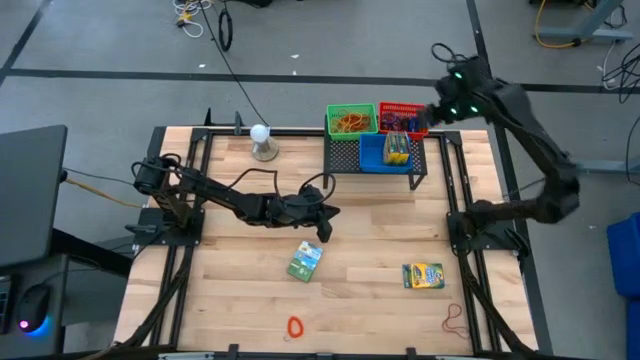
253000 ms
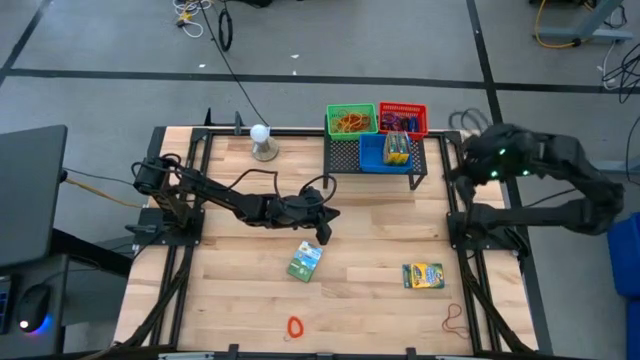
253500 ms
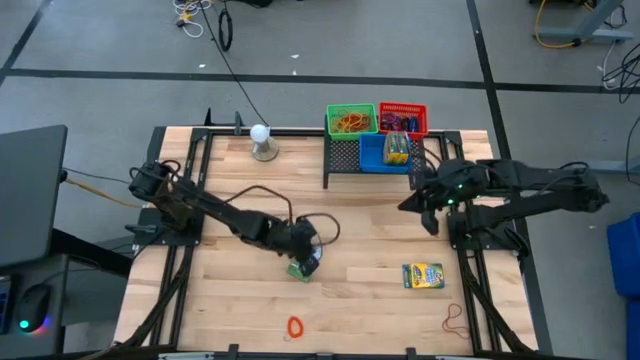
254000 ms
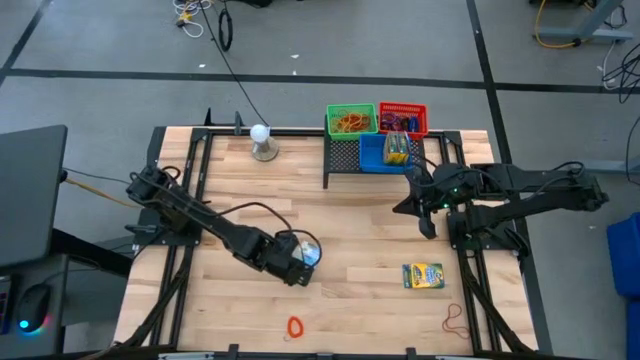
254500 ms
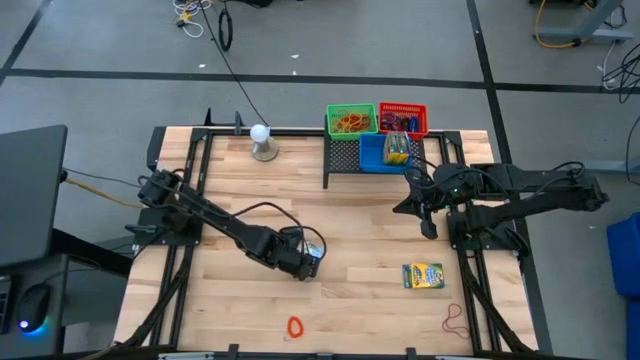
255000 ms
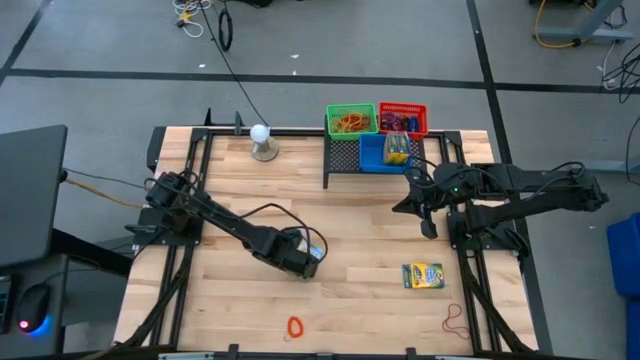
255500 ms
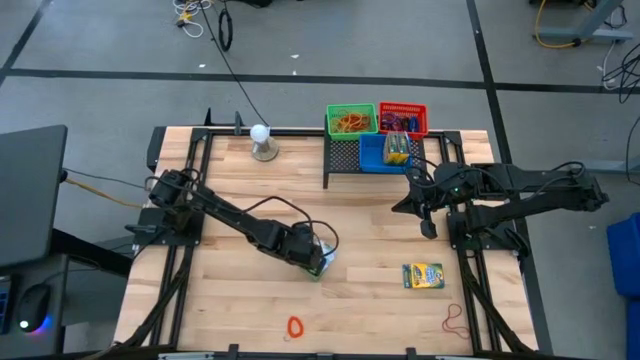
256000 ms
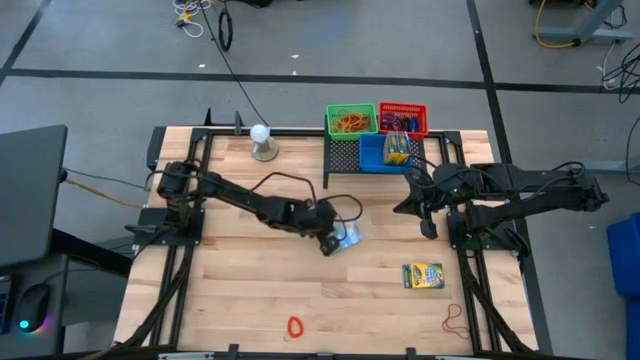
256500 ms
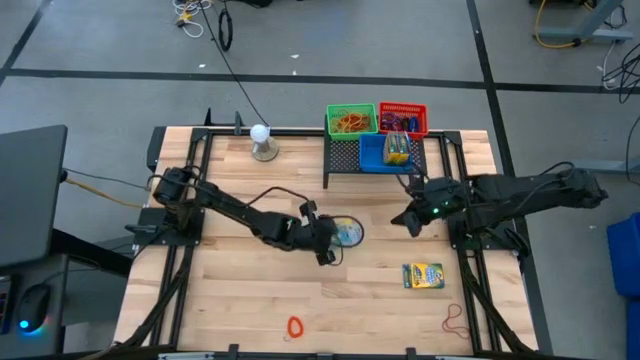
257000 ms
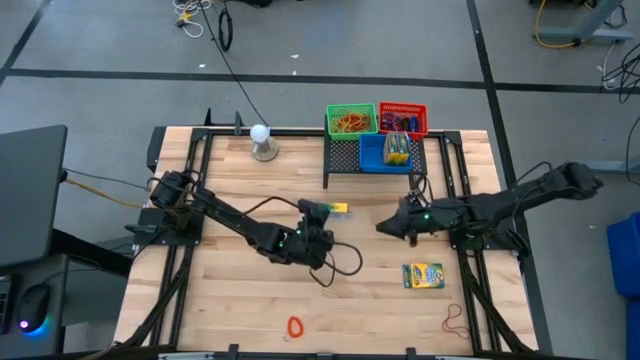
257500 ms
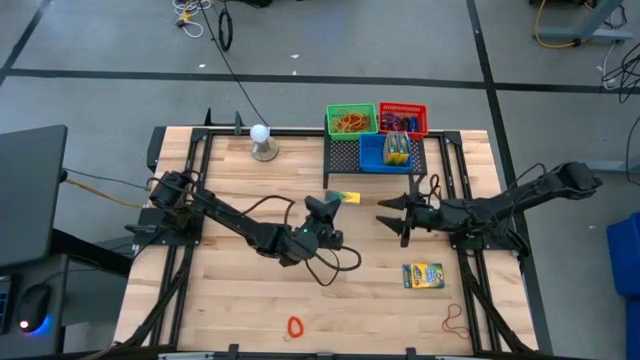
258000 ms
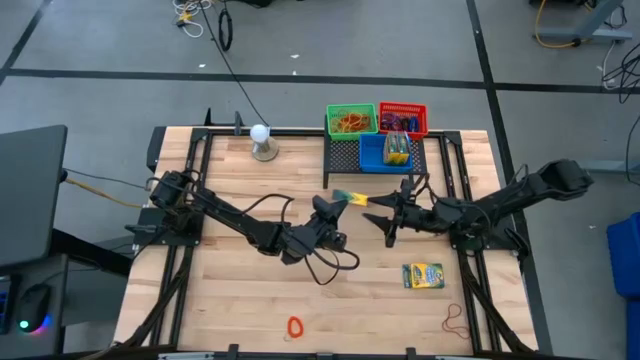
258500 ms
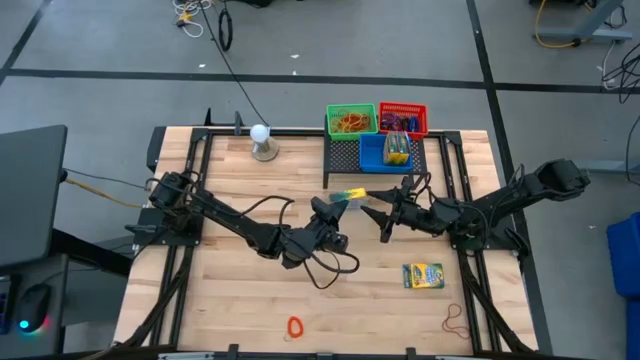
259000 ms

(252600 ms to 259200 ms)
Task: Pick & Place Office Desk Supplies
Put the yellow crayon box into the blue bin

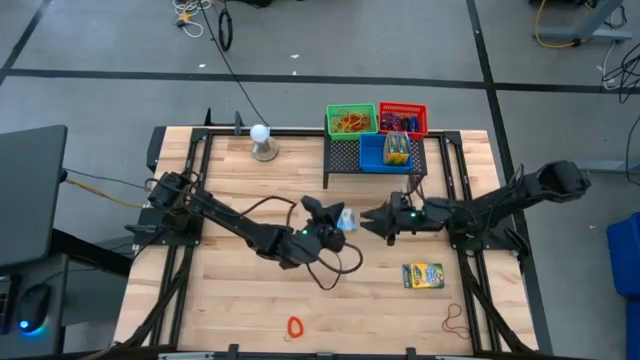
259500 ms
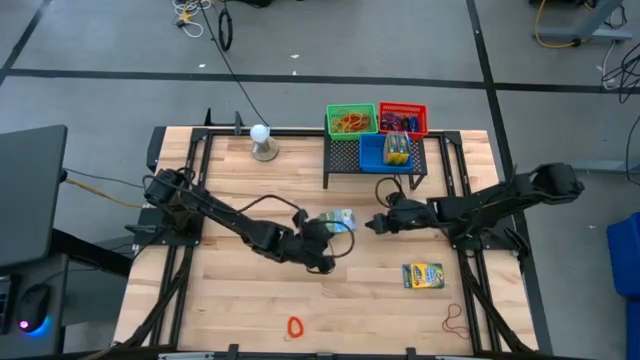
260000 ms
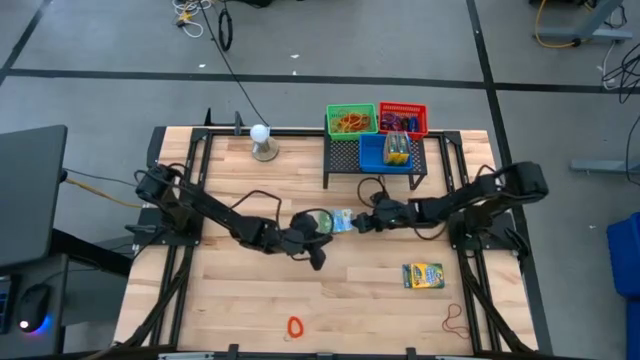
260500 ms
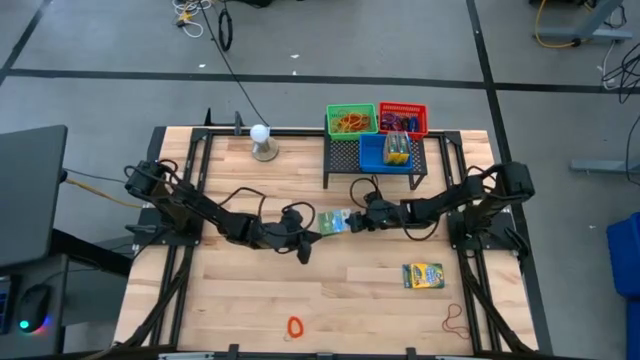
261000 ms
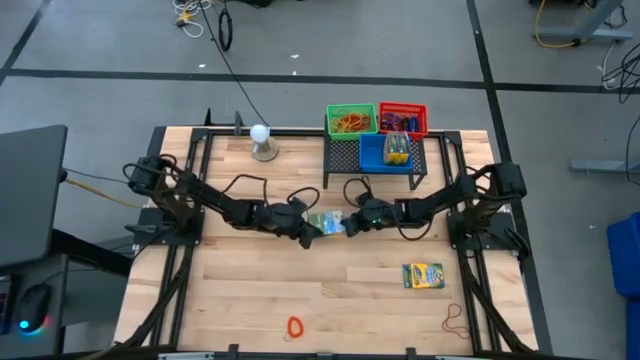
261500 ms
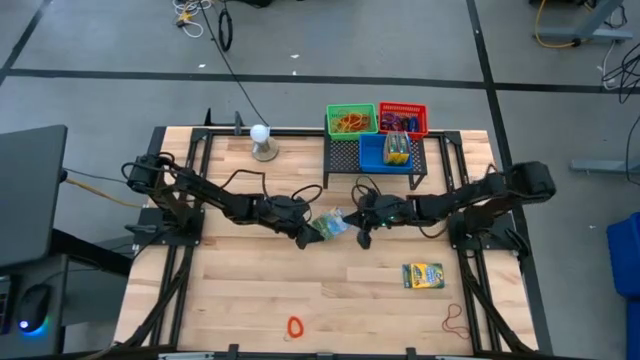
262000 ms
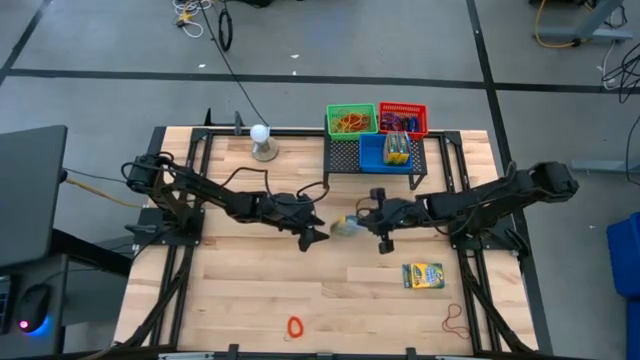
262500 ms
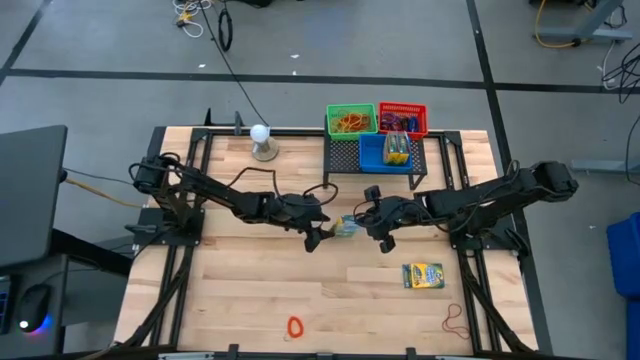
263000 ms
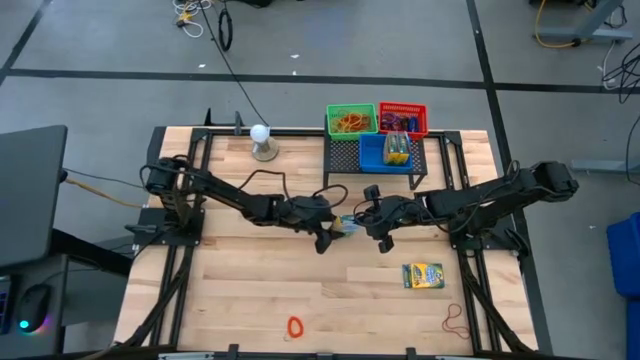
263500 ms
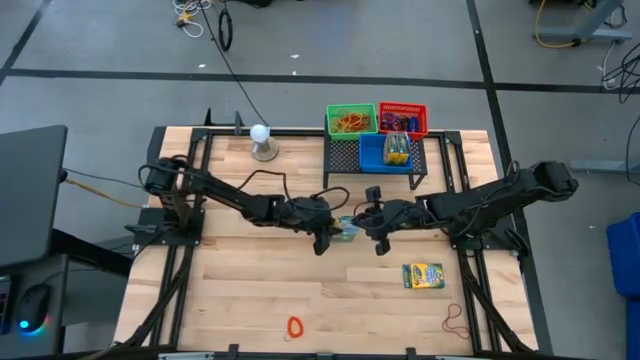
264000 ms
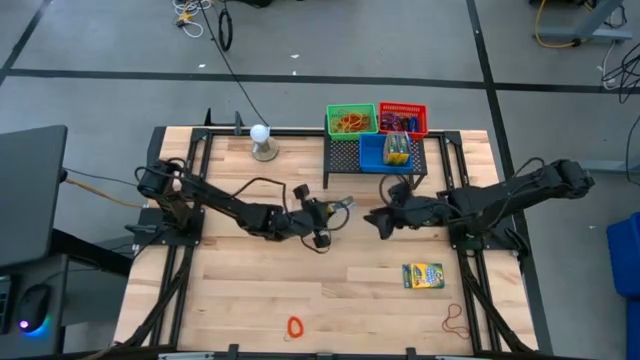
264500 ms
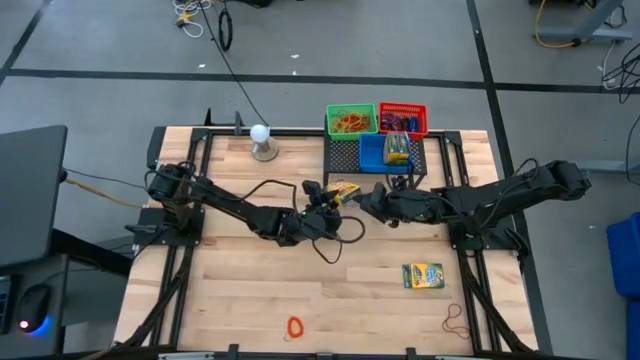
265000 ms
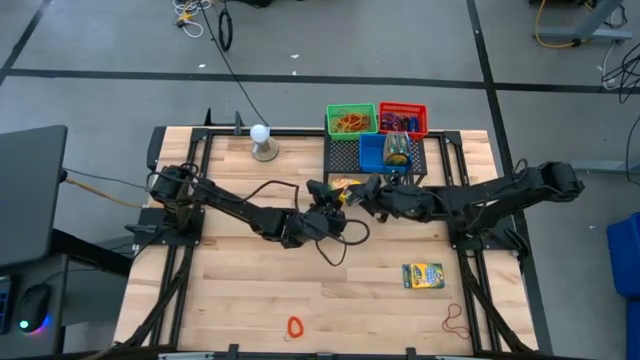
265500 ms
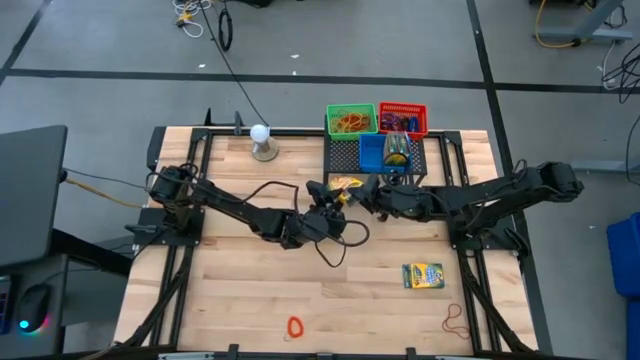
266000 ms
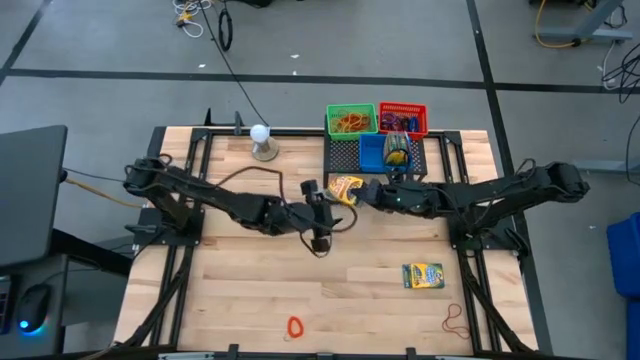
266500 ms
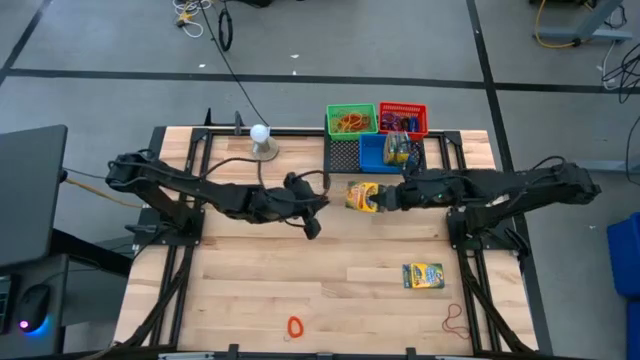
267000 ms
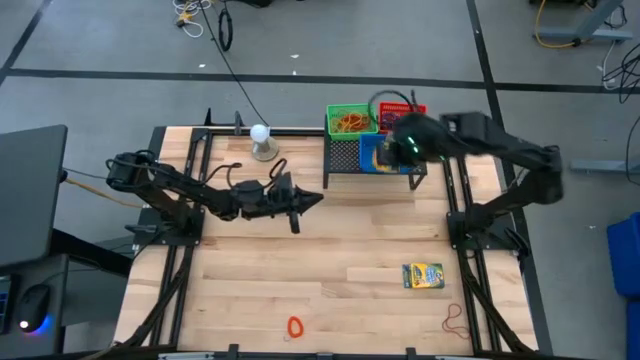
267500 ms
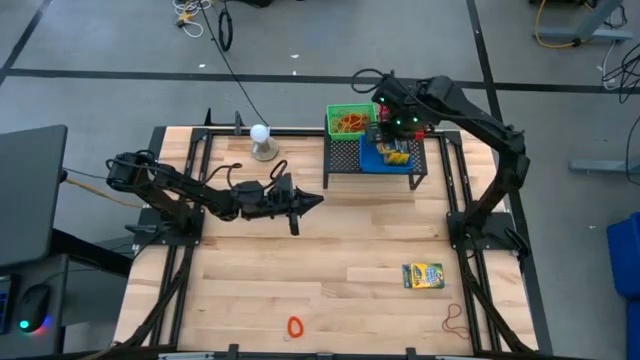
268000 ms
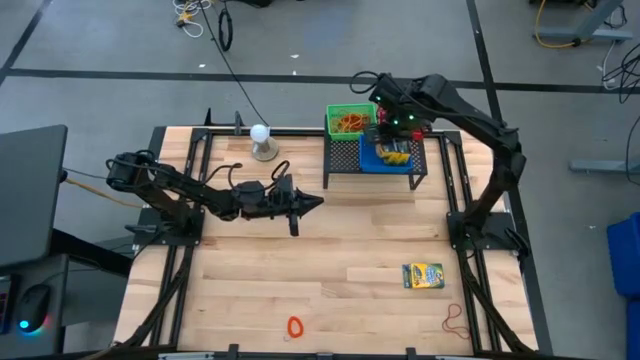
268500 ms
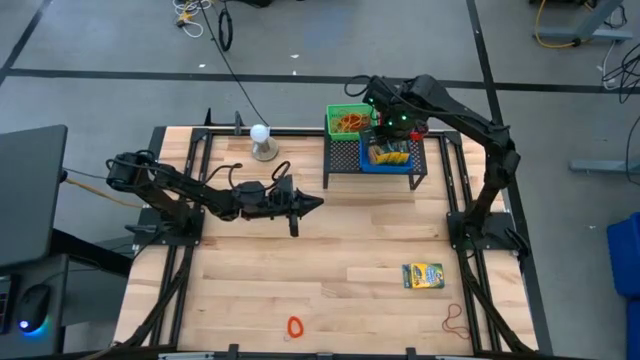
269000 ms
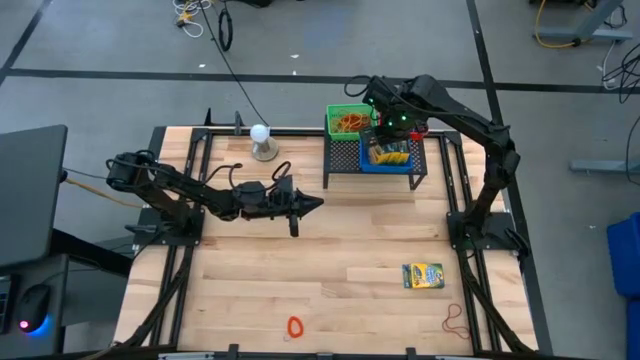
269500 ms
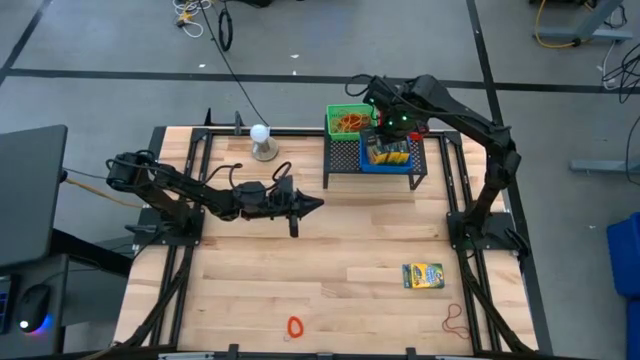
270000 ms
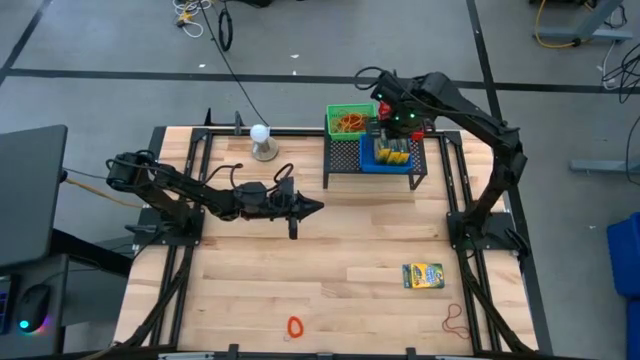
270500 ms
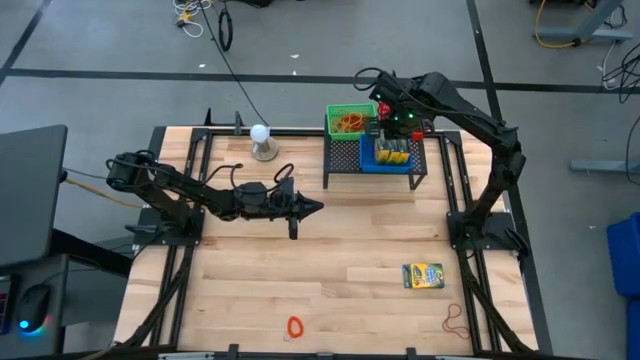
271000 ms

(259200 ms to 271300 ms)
Put the yellow crayon box into the blue bin

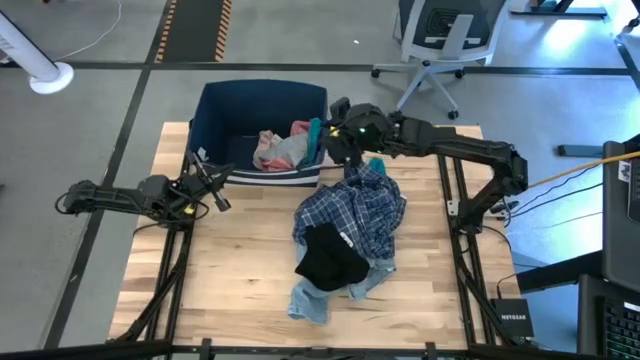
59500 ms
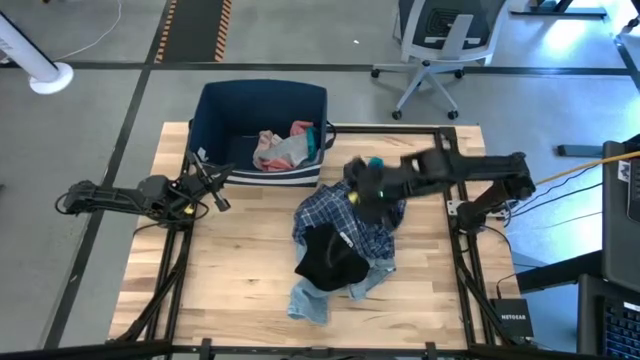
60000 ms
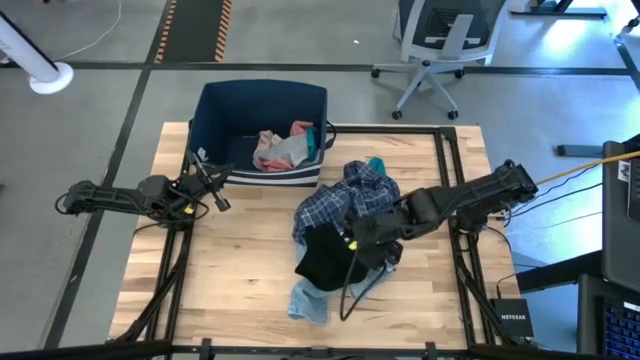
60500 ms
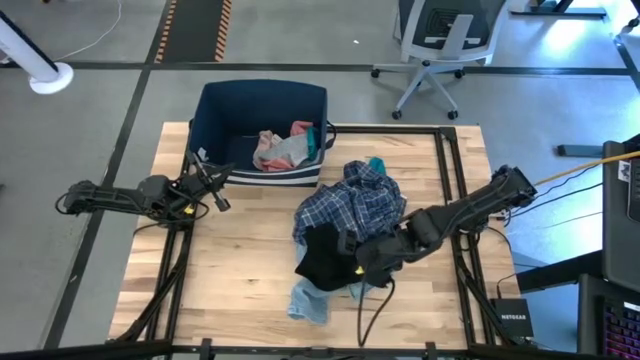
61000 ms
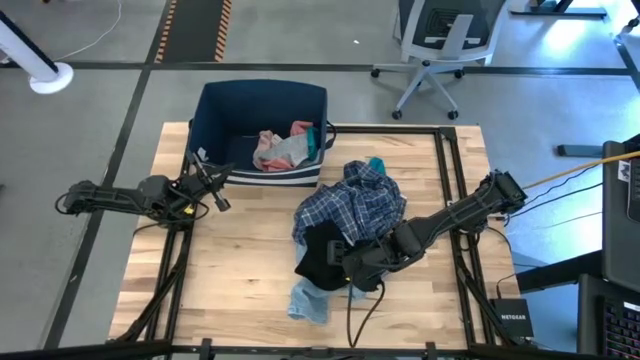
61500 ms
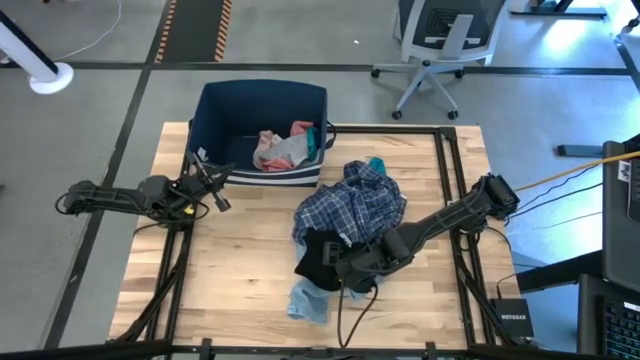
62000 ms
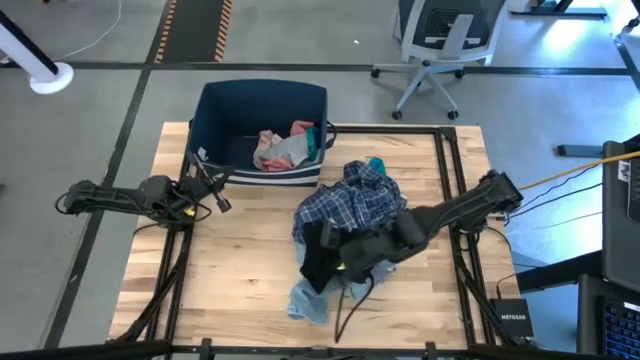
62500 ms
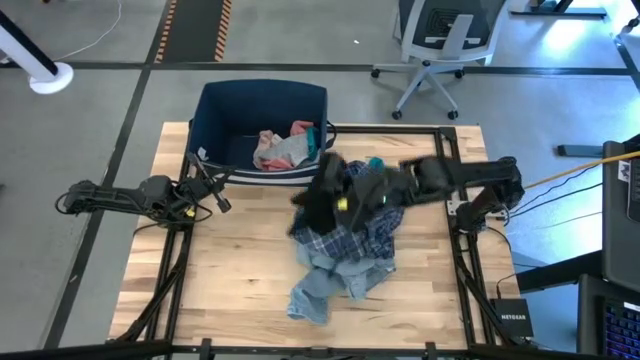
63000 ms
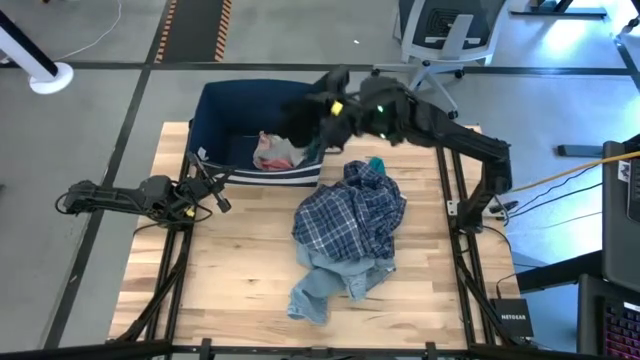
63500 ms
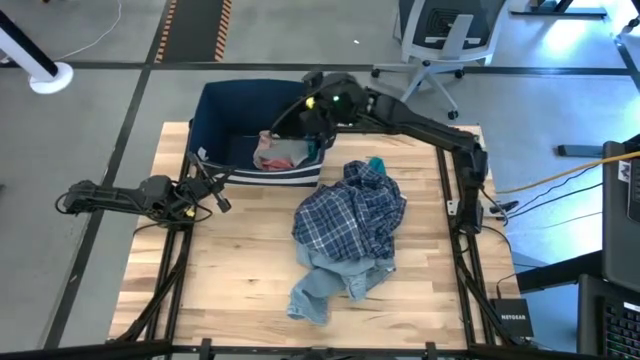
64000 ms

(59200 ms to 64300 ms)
Task: Sort clothes
Put the black underwear into the blue laundry bin
